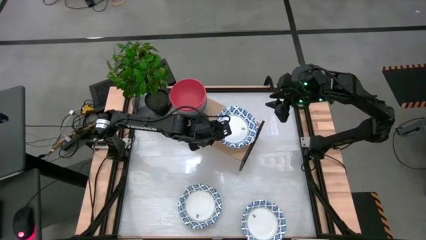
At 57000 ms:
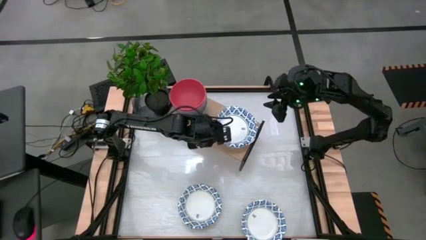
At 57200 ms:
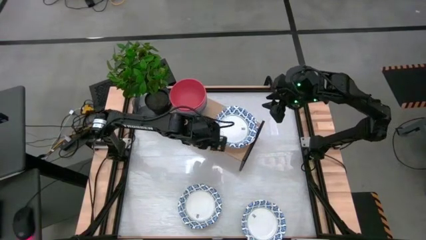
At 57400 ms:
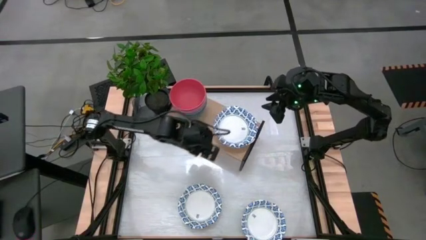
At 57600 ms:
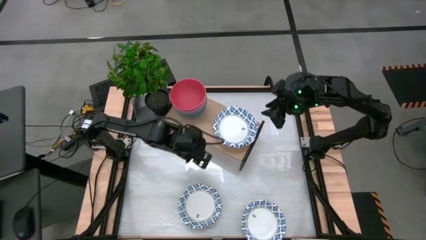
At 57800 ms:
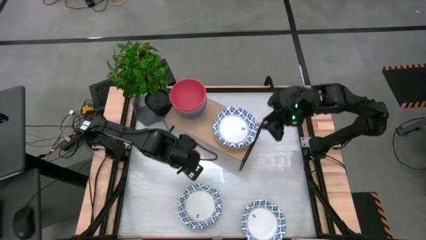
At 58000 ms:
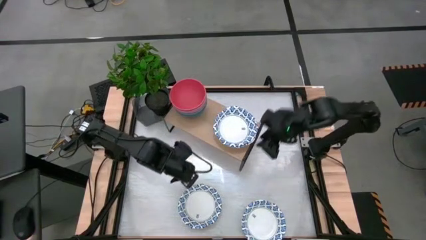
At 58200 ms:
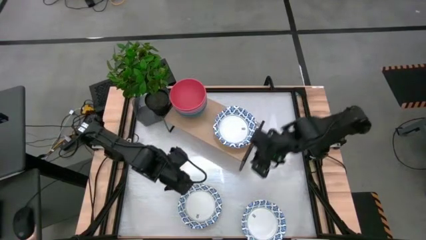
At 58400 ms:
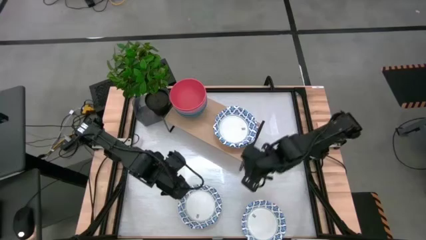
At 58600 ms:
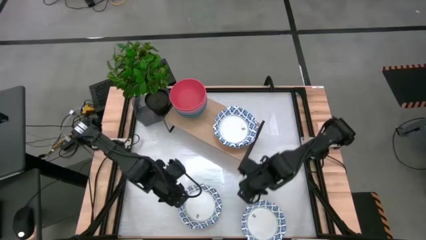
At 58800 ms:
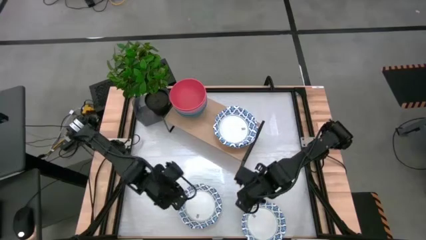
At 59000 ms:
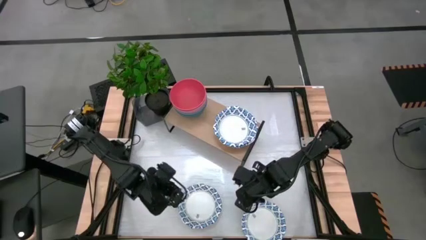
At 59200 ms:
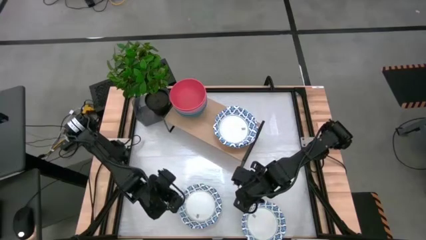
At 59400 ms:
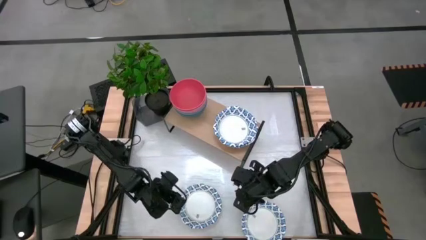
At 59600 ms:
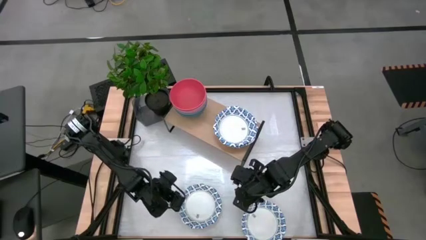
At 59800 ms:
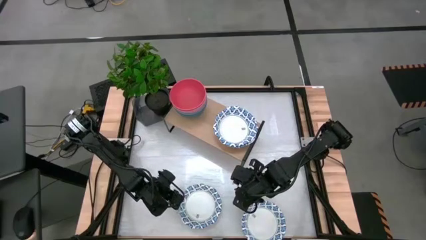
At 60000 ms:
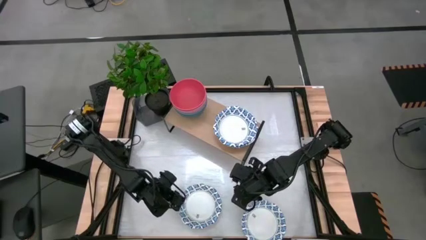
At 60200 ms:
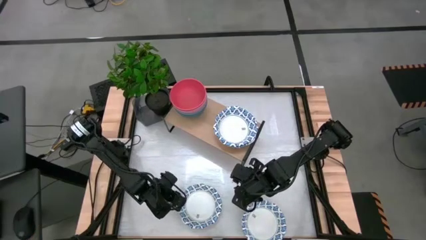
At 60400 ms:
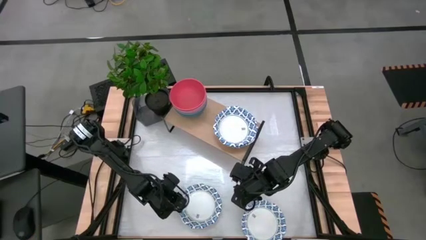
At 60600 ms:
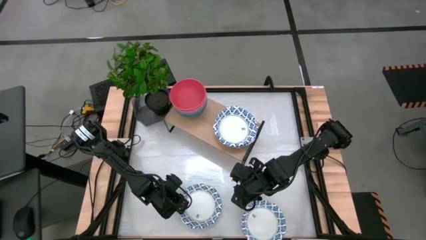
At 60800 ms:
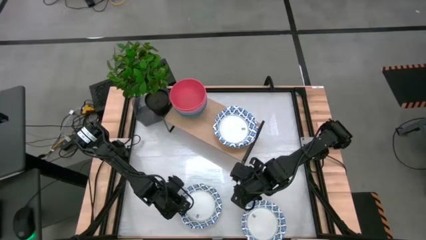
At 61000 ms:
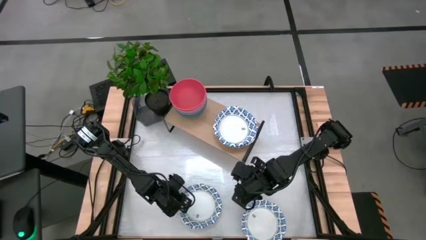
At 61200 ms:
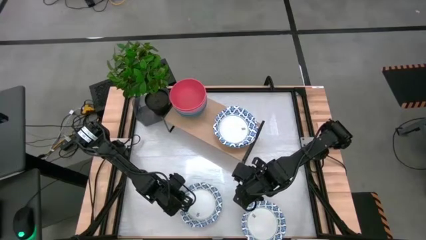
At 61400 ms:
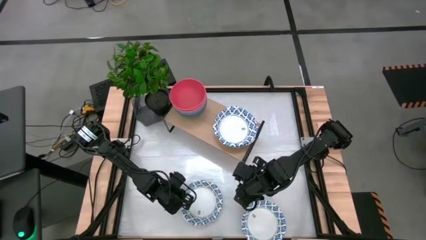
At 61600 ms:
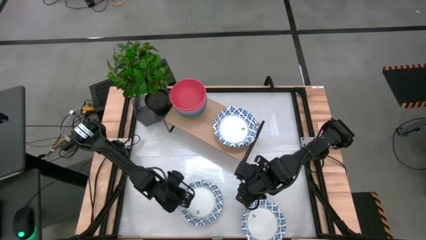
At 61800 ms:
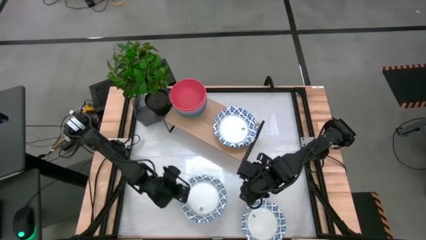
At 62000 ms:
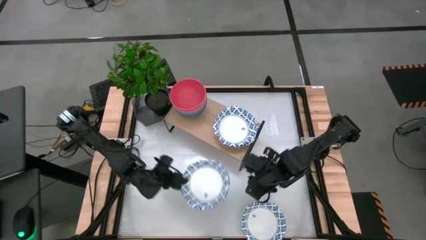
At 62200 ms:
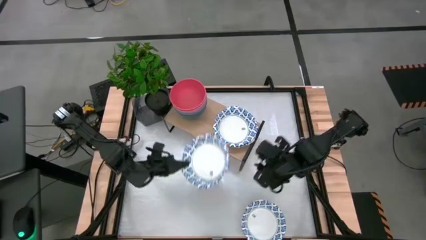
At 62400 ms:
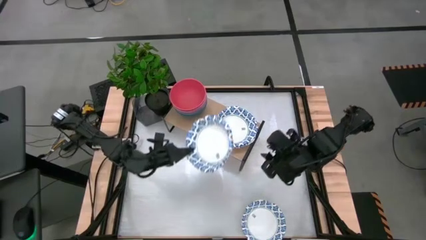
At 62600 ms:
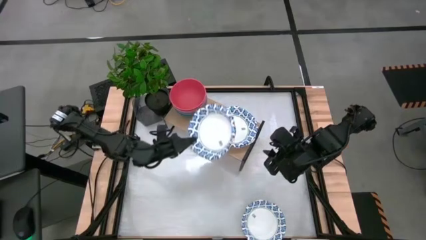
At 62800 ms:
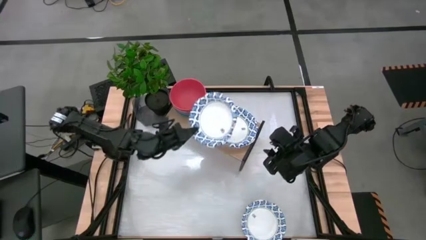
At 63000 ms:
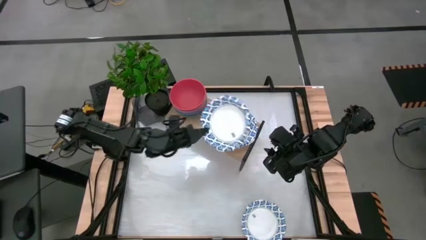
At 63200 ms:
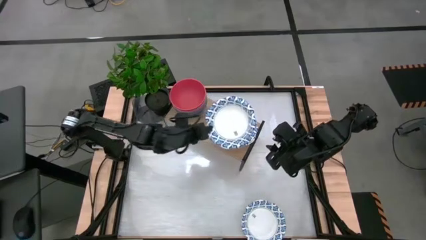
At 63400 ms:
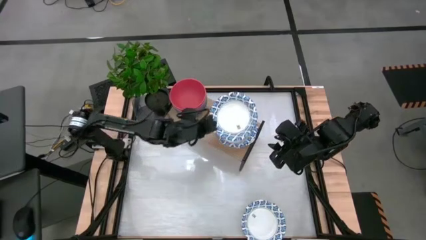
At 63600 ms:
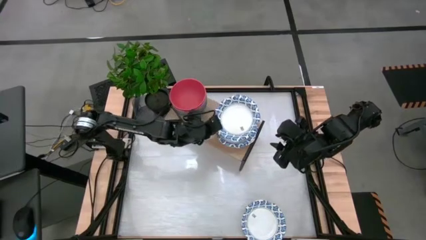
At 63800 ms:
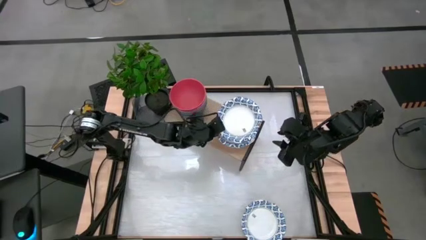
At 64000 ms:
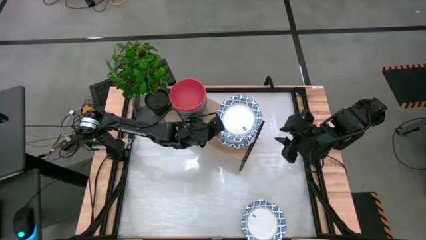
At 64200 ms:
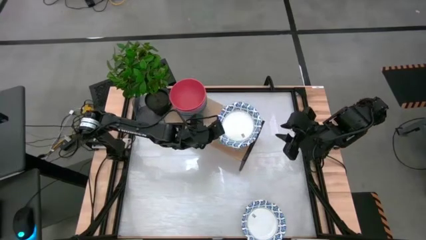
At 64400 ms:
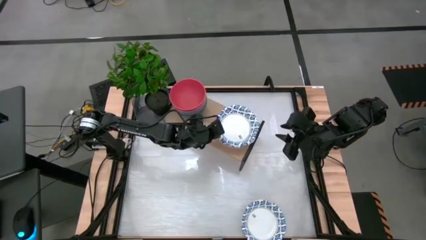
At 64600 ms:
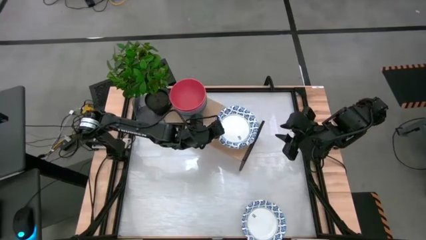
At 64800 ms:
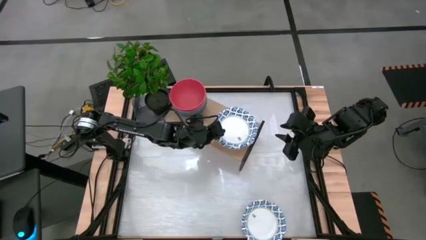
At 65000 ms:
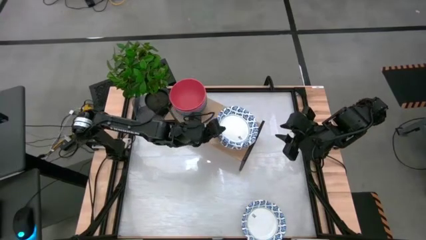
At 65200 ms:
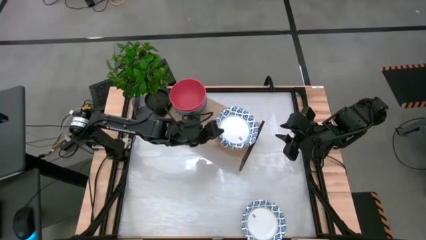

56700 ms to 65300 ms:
Task: Place and stack bowls onto a shelf
Stack the white patterned bowl on top of the other white patterned bowl on the shelf

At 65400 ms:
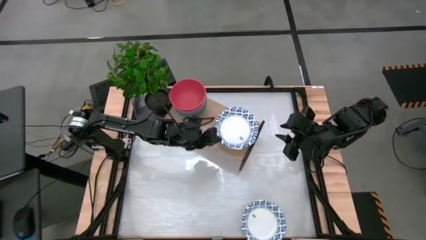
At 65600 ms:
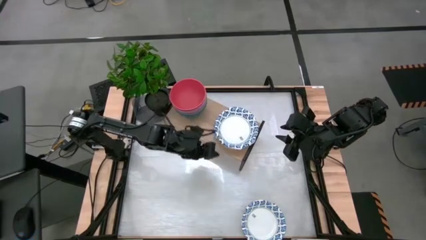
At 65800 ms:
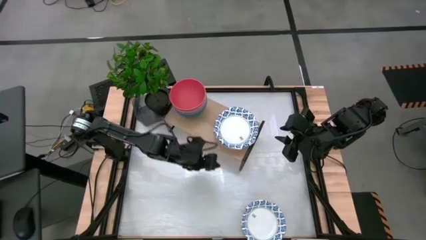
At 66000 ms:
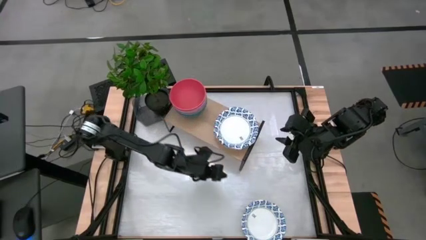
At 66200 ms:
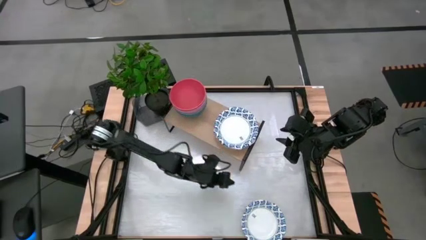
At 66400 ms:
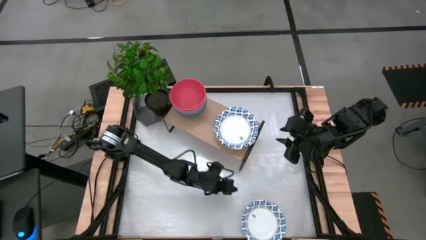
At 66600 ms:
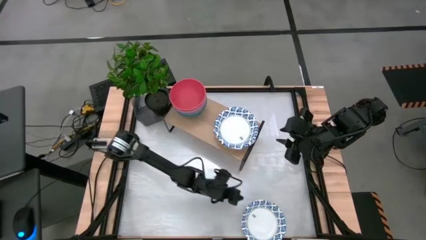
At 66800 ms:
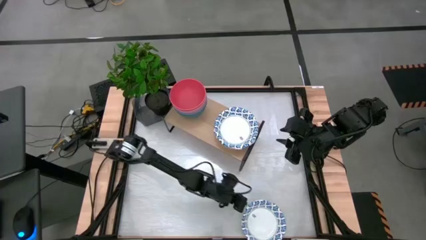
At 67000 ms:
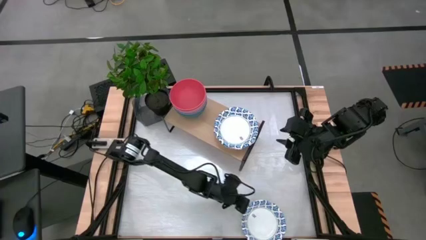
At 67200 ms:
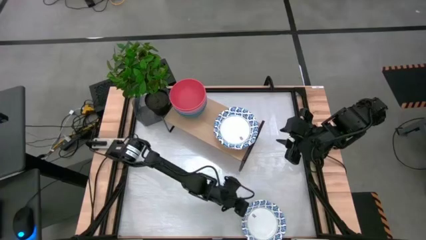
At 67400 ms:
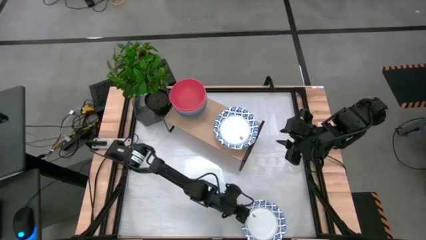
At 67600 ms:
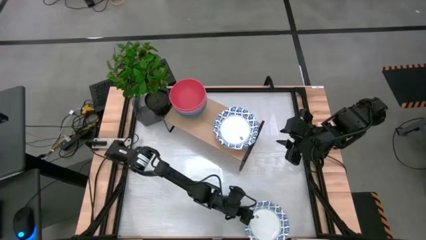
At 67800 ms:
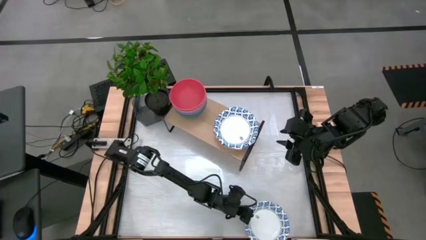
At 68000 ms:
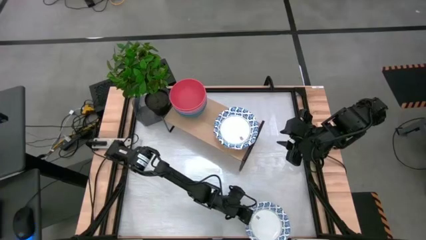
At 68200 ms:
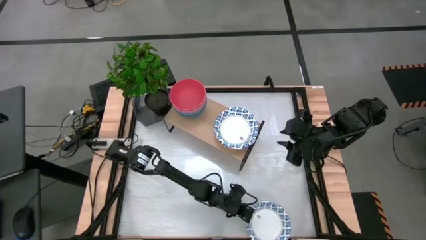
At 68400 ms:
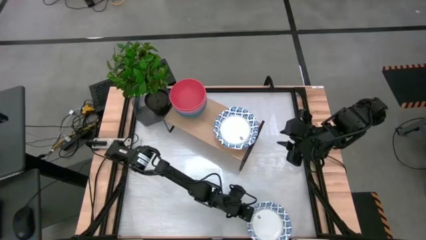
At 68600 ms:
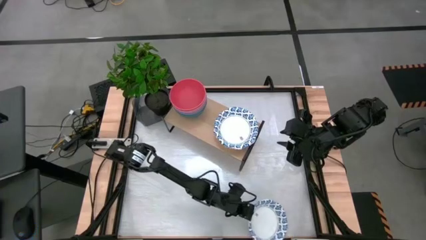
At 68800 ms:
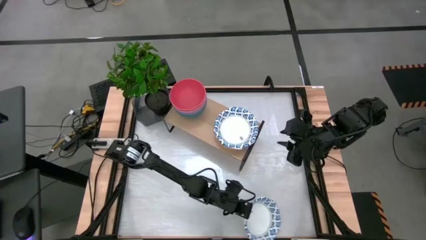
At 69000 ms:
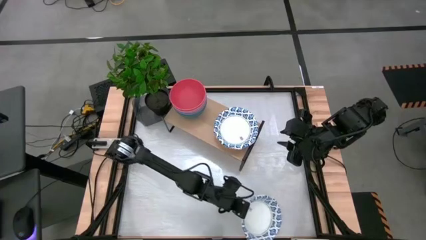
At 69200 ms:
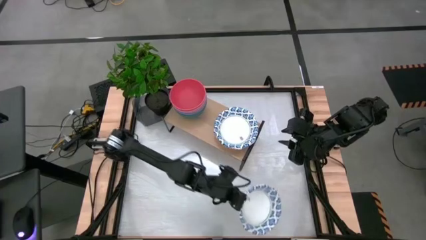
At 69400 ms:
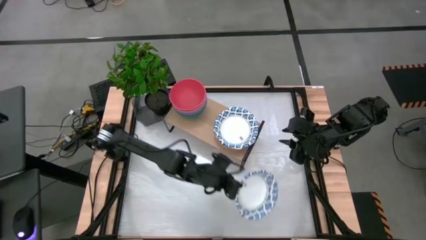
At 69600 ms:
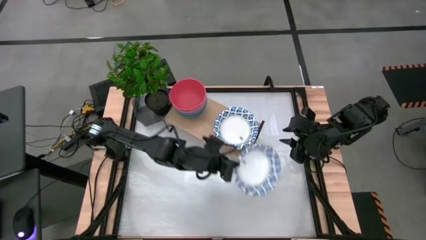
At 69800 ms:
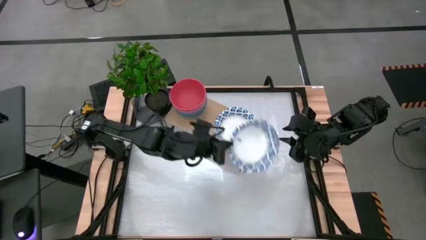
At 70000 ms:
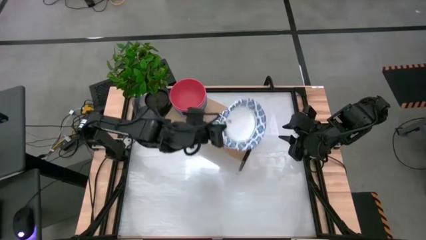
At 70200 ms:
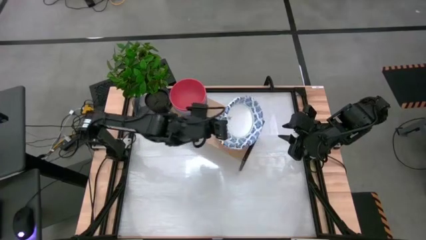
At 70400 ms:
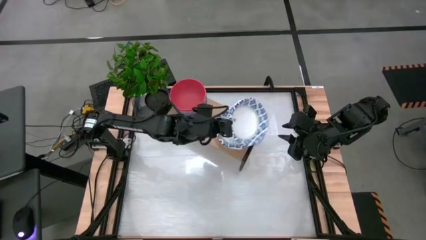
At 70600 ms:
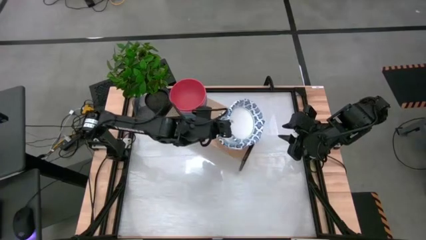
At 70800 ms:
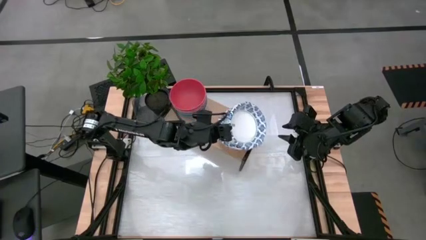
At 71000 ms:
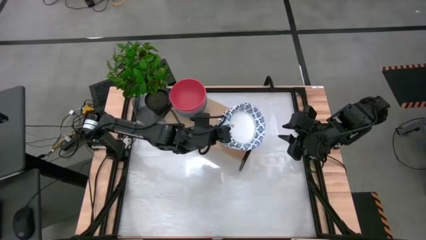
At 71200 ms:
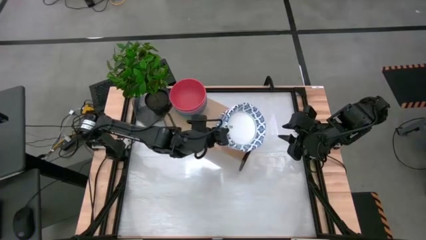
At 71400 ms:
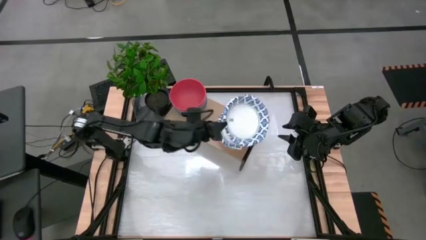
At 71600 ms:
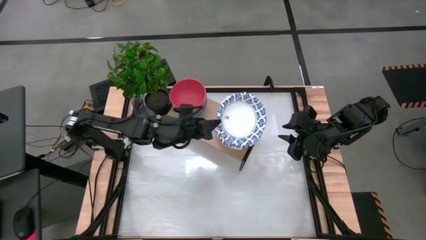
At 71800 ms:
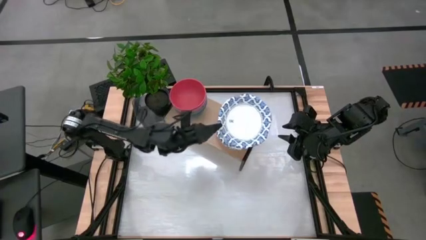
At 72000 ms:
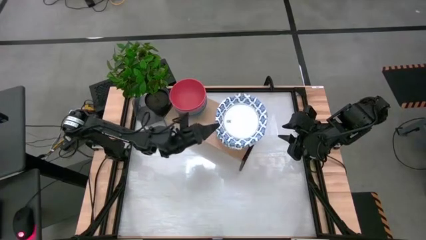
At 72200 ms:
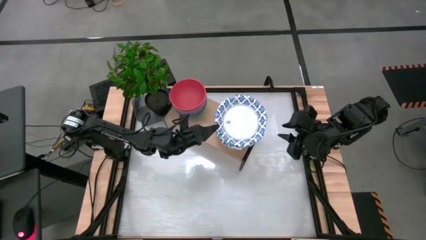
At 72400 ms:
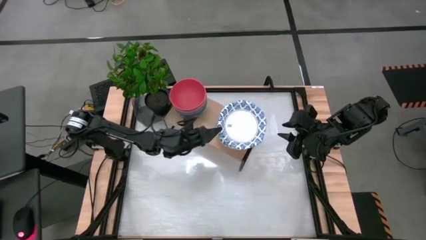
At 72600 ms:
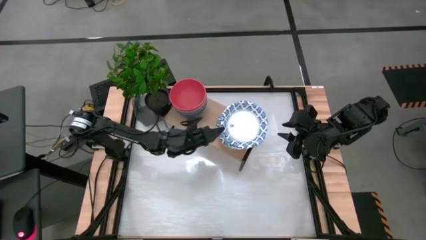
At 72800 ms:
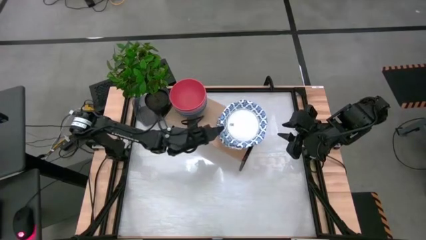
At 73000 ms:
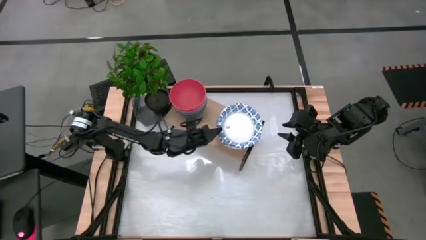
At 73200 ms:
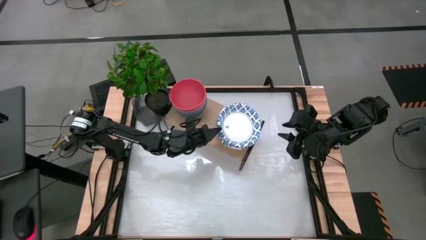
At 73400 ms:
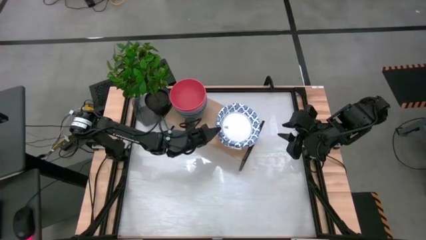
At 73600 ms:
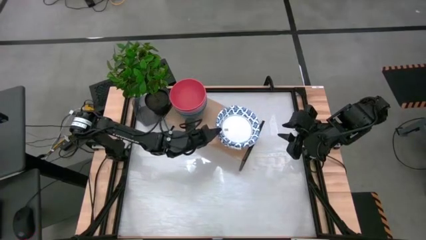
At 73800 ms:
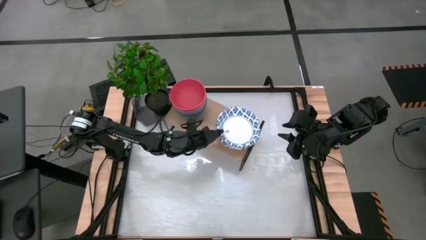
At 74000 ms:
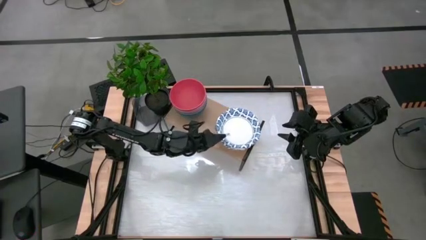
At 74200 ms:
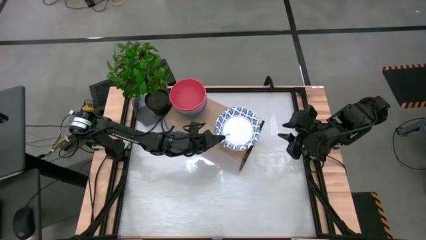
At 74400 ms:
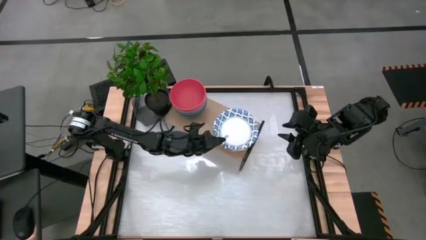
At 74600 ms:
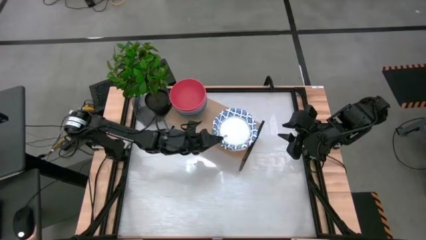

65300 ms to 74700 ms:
Stack the white patterned bowl on top of the other white patterned bowl on the shelf
